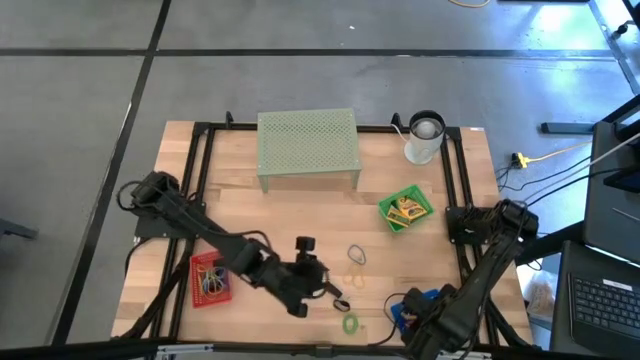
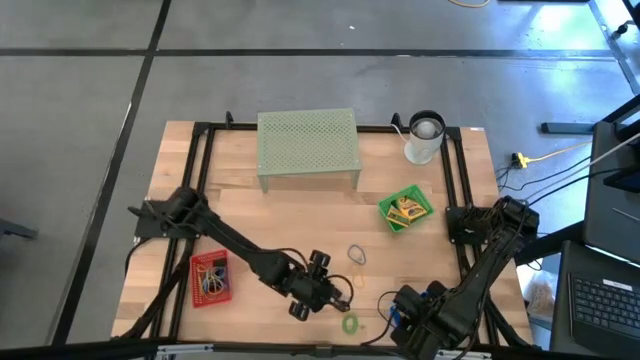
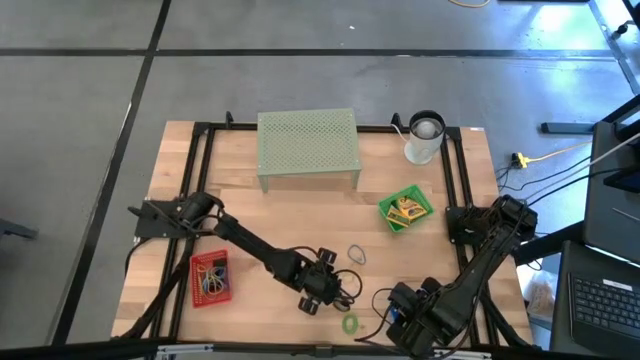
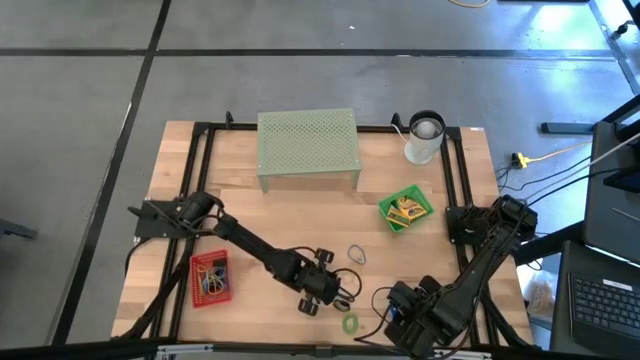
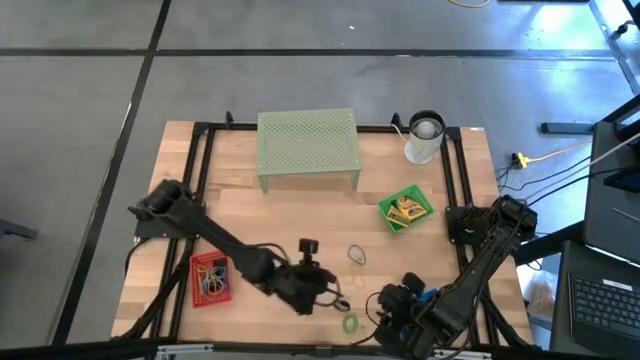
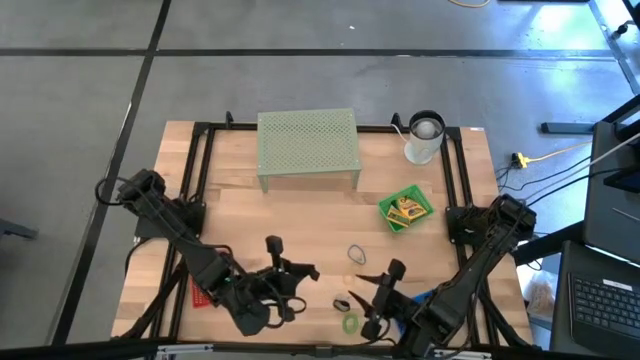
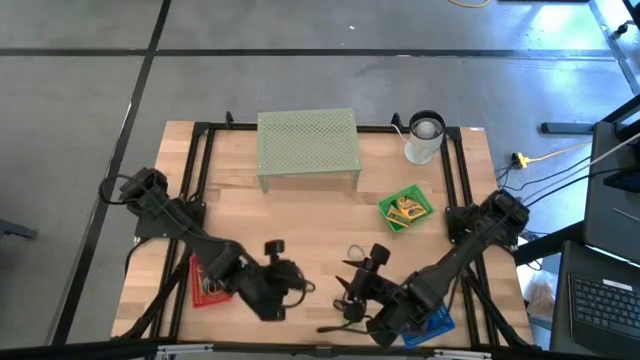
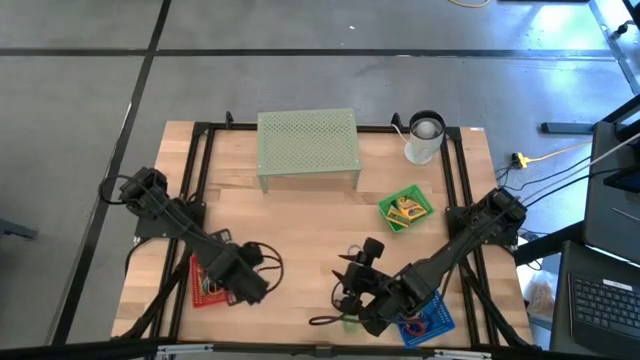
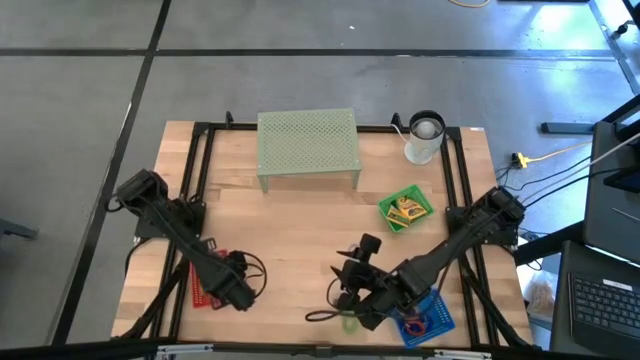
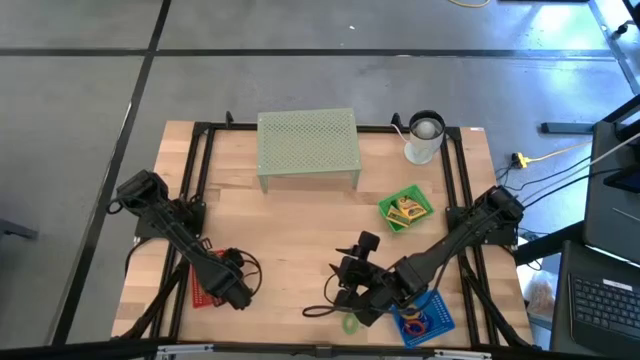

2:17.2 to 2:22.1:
Task: Pick & Place Office Desk Supplies
Put the black rubber band into the red bin

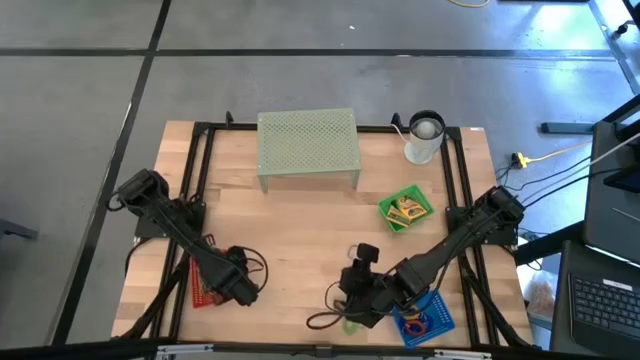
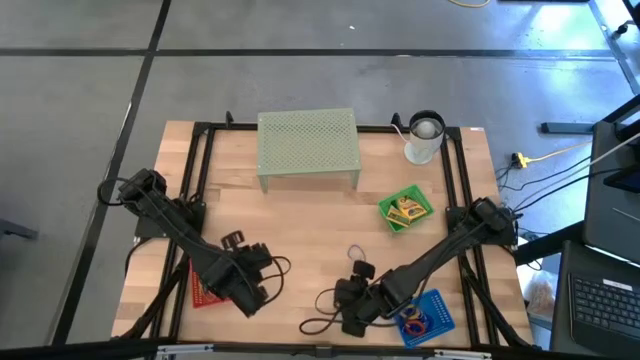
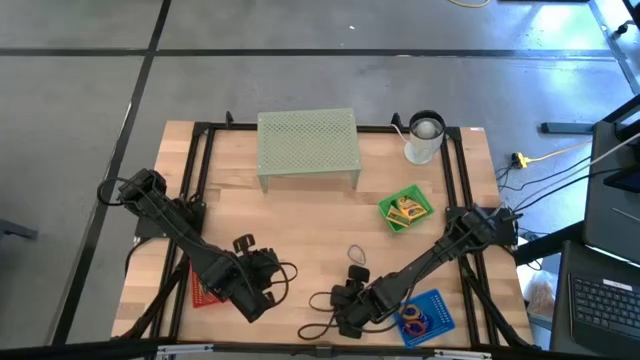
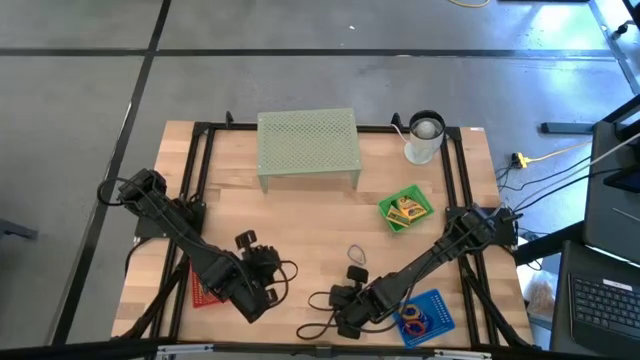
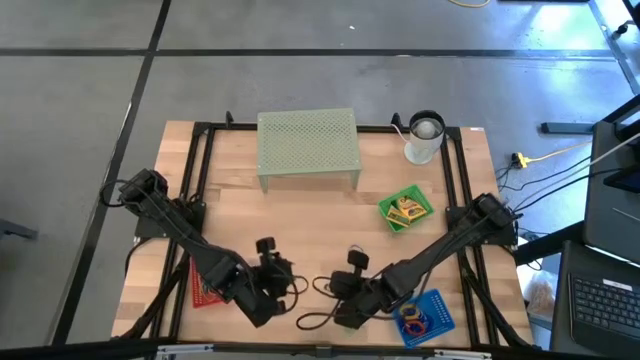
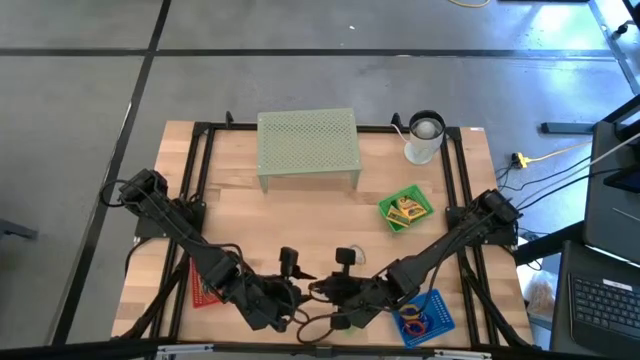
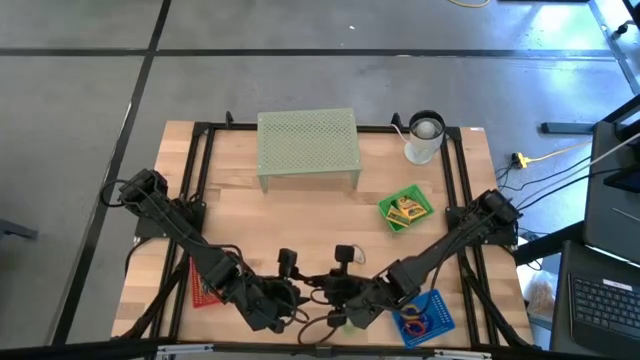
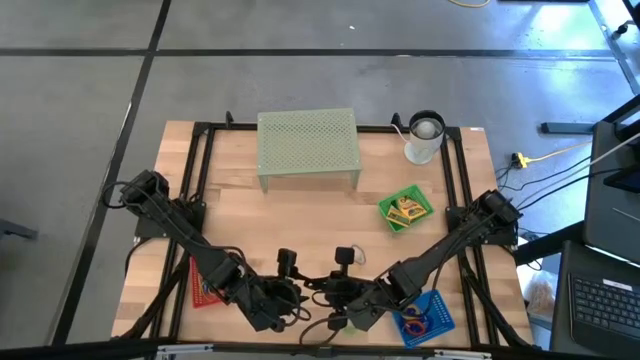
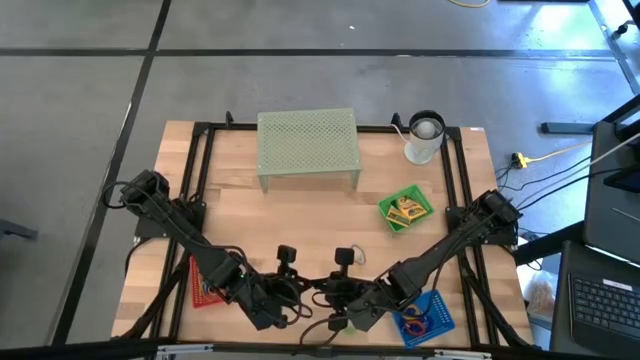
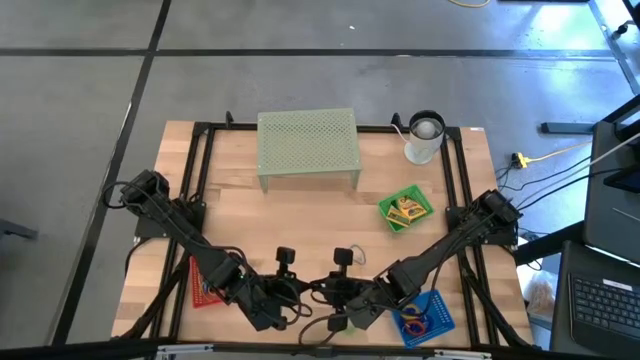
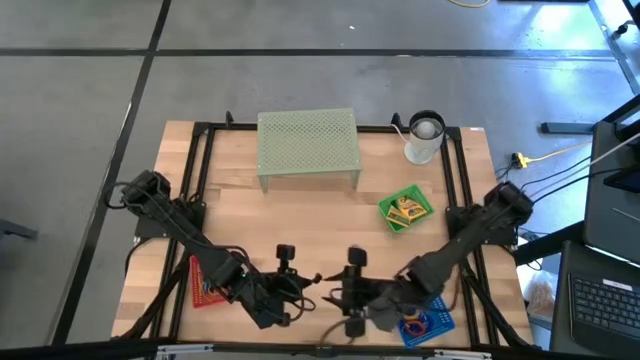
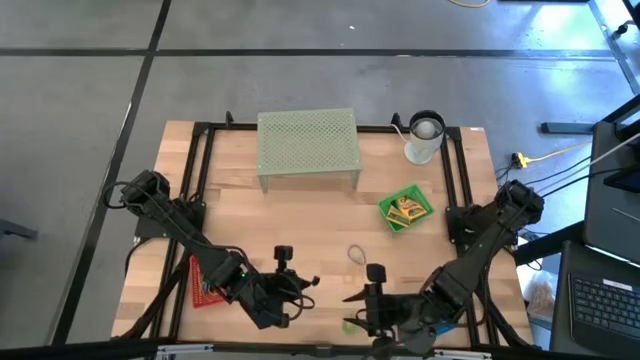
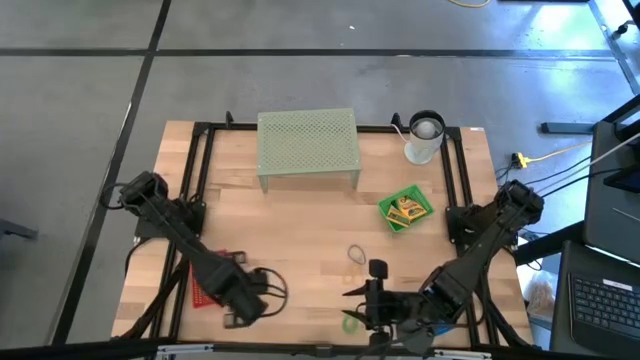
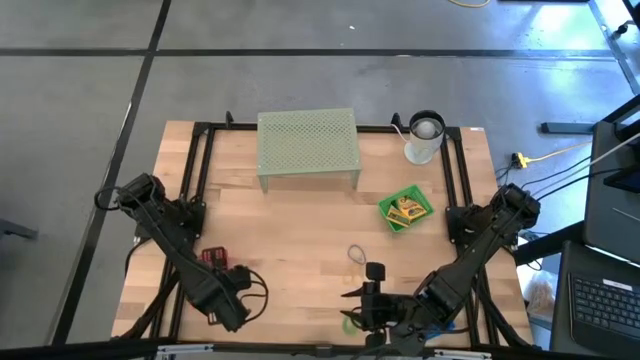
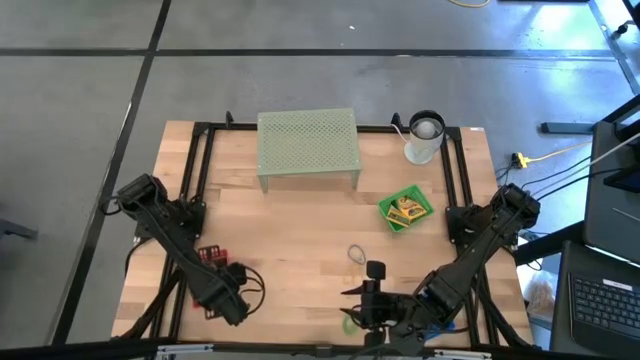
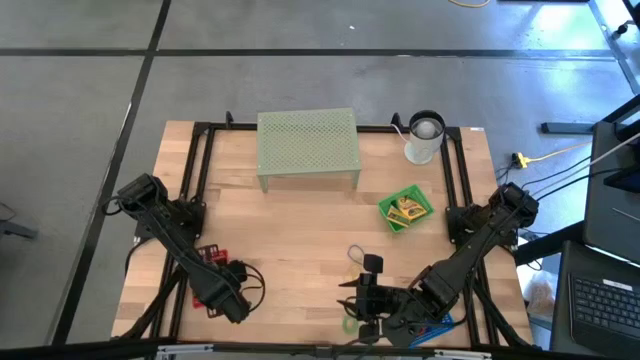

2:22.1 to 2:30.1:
Put the black rubber band into the red bin

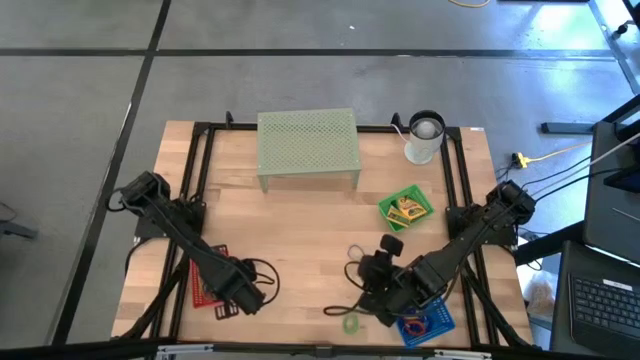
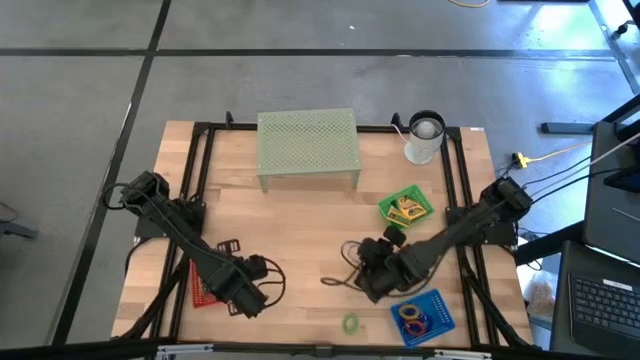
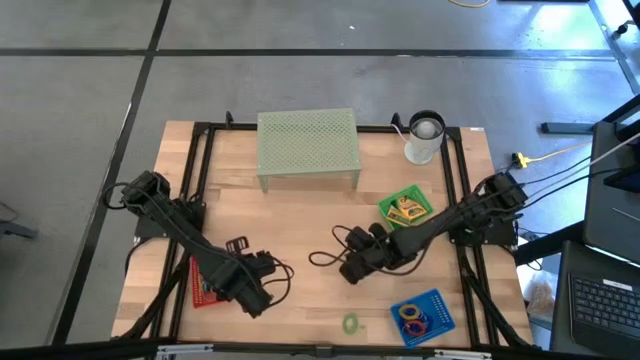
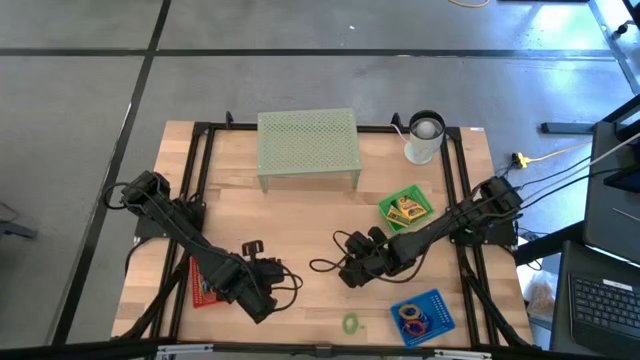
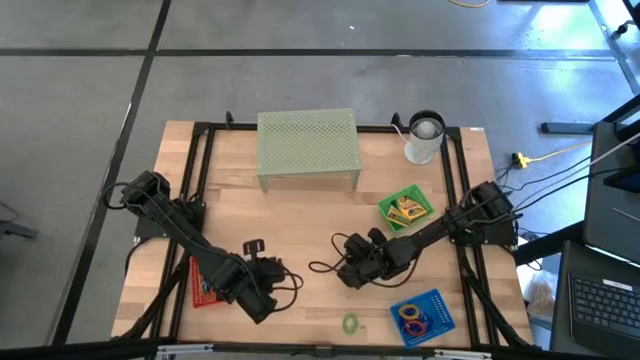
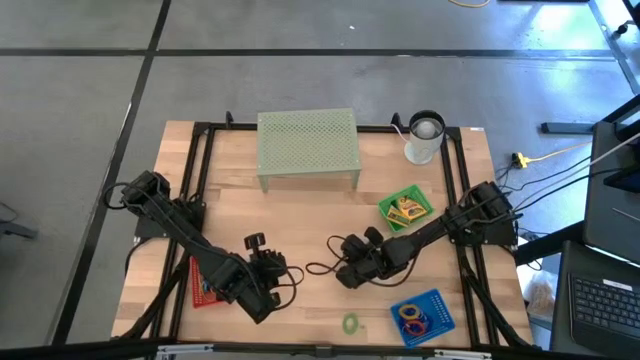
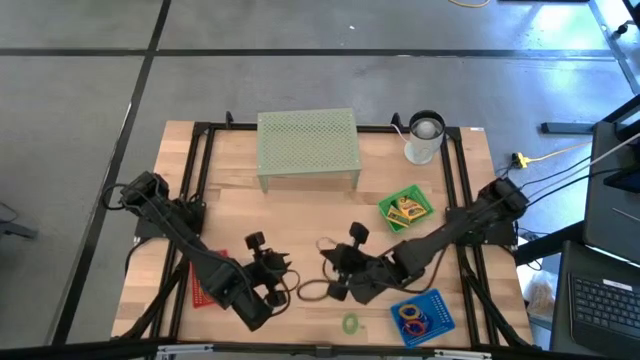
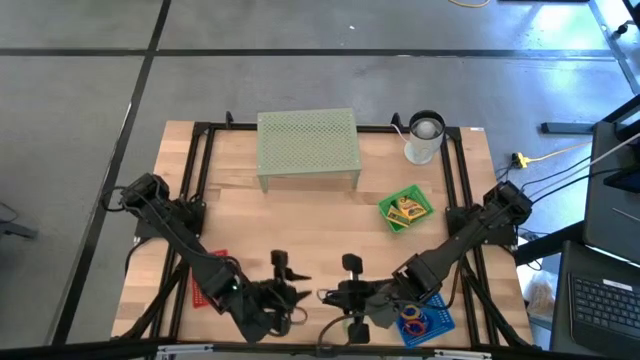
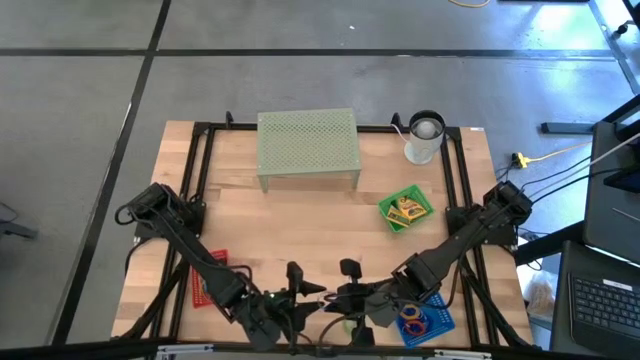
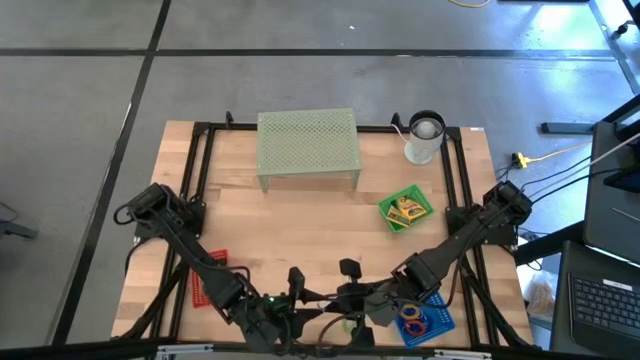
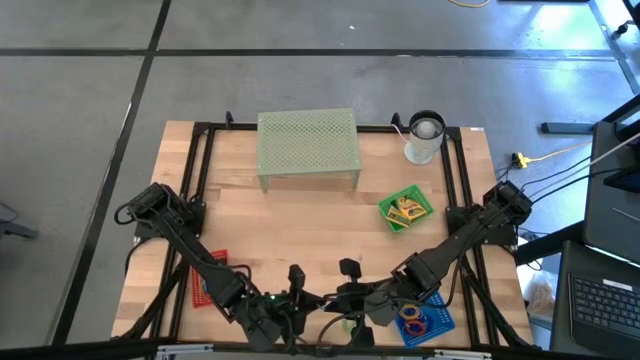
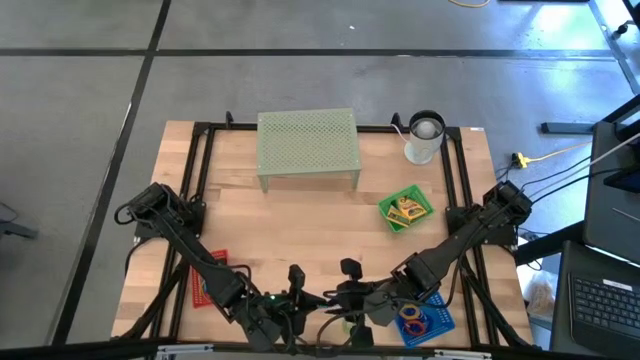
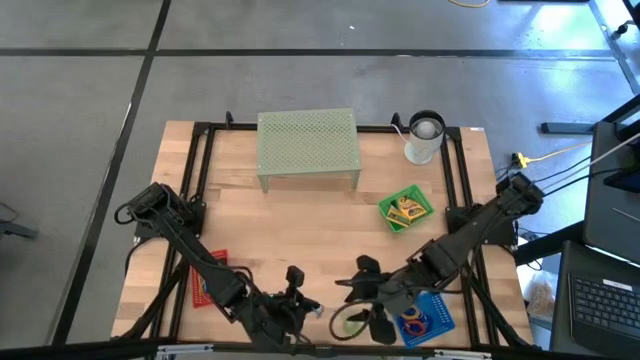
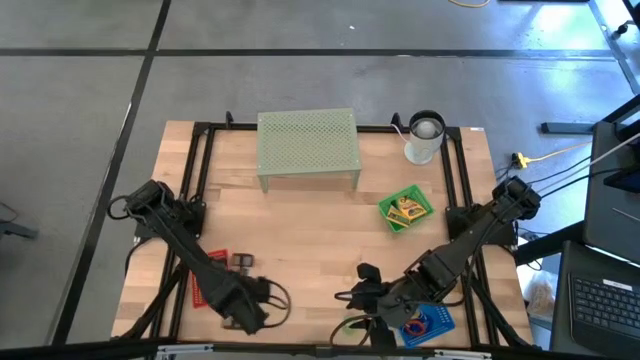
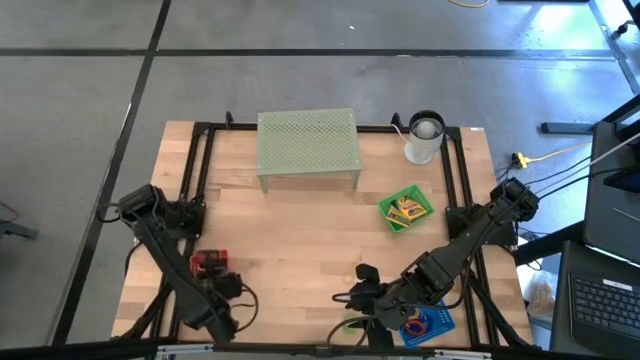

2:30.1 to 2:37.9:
Put the blue rubber band into the red bin
